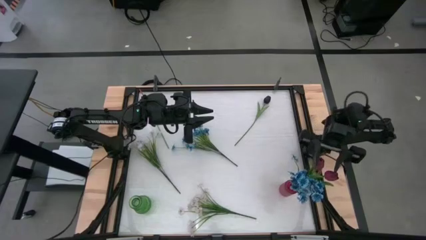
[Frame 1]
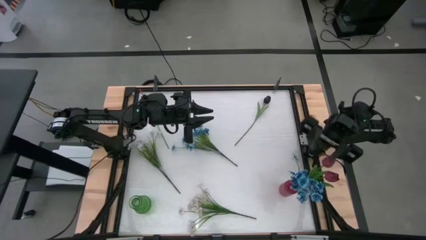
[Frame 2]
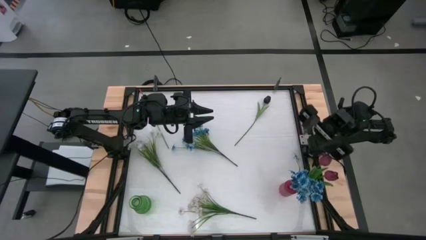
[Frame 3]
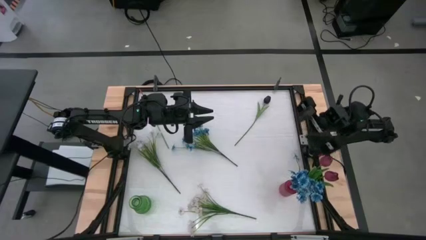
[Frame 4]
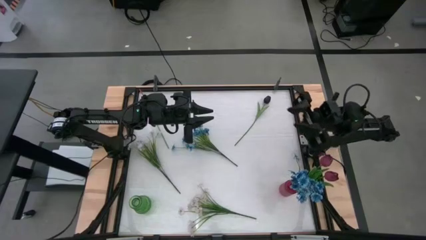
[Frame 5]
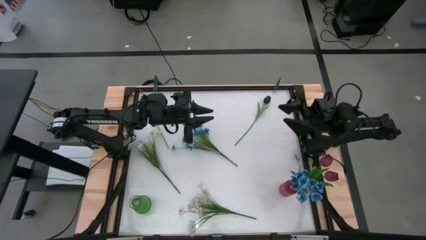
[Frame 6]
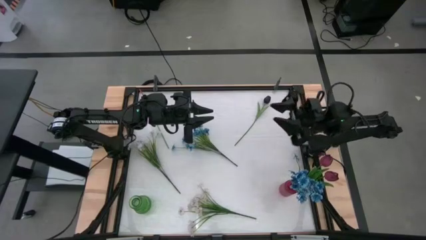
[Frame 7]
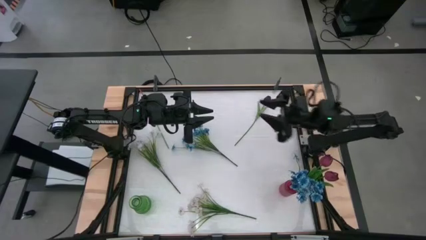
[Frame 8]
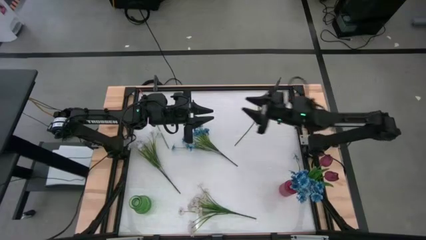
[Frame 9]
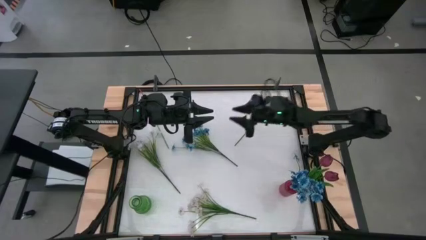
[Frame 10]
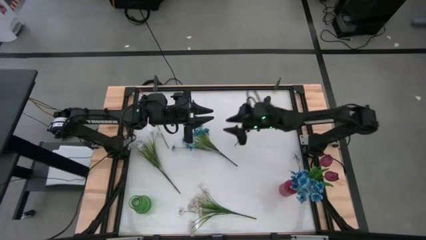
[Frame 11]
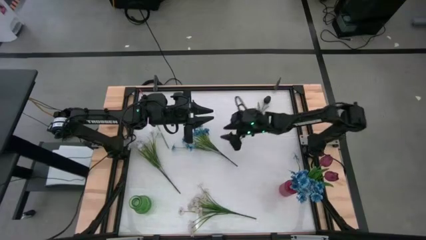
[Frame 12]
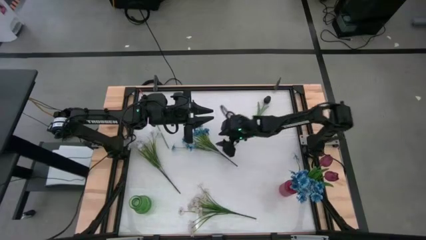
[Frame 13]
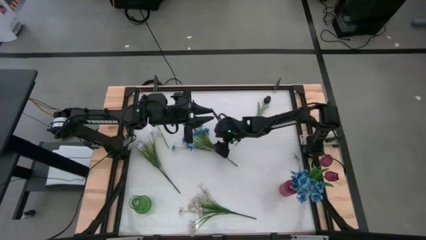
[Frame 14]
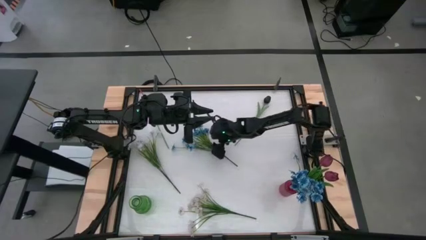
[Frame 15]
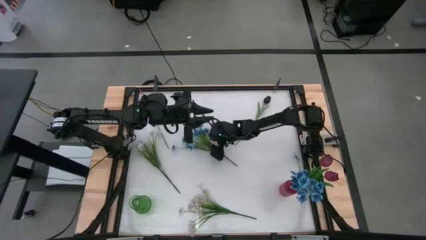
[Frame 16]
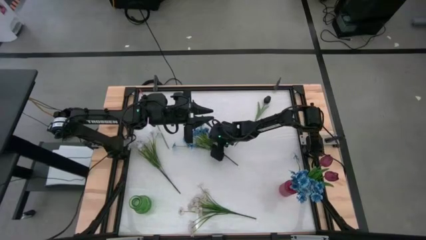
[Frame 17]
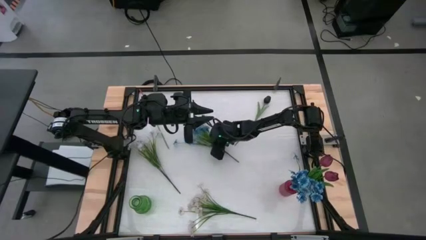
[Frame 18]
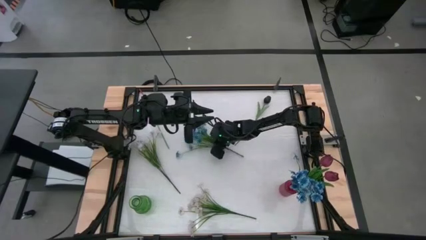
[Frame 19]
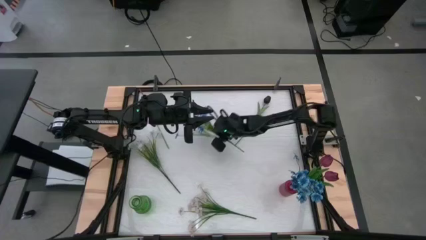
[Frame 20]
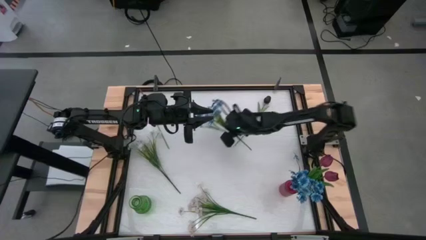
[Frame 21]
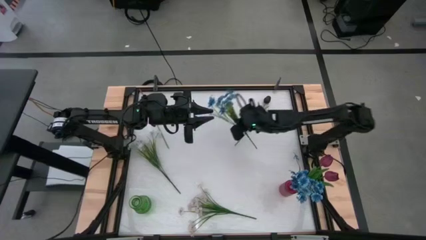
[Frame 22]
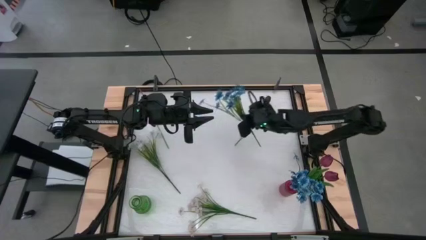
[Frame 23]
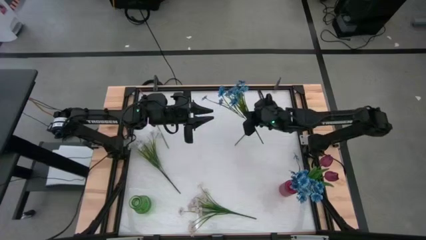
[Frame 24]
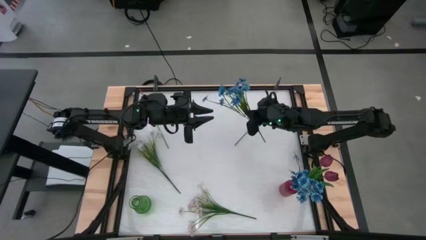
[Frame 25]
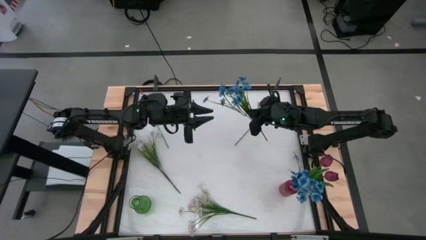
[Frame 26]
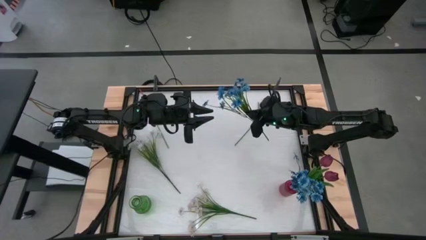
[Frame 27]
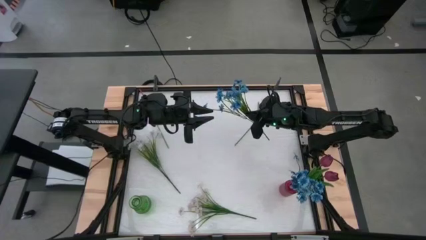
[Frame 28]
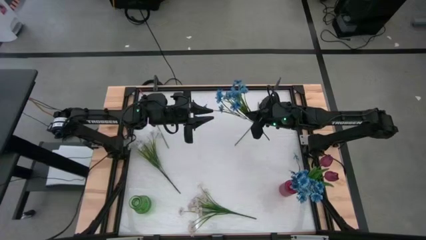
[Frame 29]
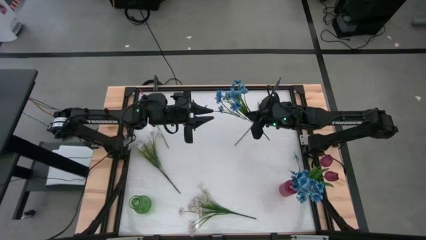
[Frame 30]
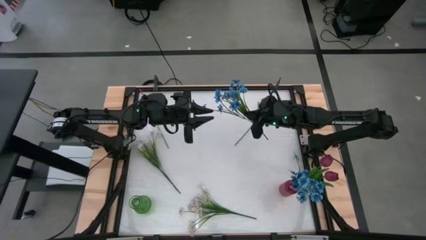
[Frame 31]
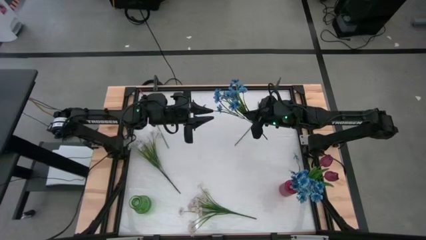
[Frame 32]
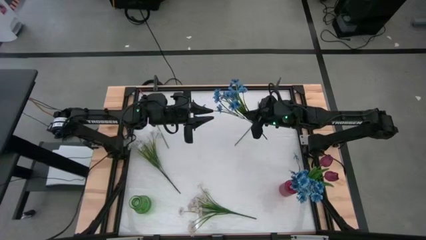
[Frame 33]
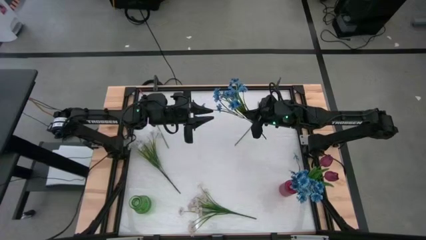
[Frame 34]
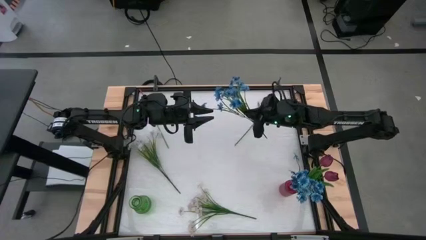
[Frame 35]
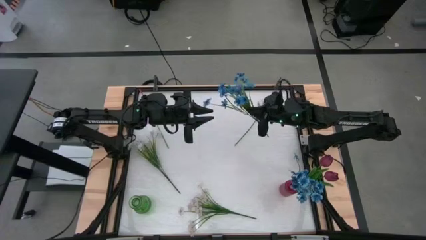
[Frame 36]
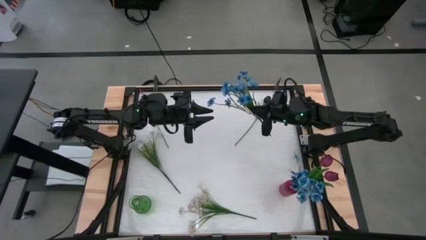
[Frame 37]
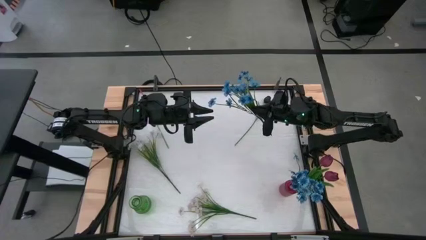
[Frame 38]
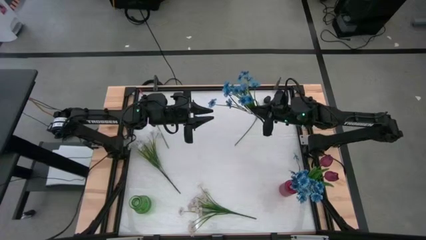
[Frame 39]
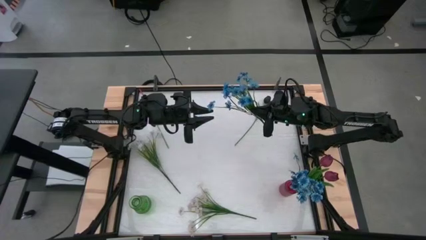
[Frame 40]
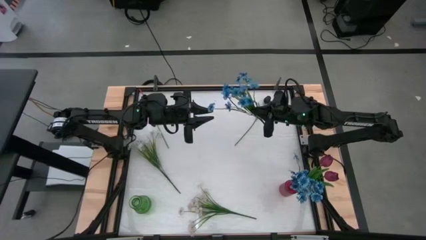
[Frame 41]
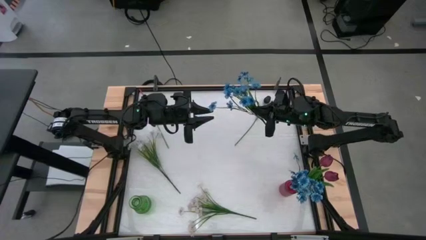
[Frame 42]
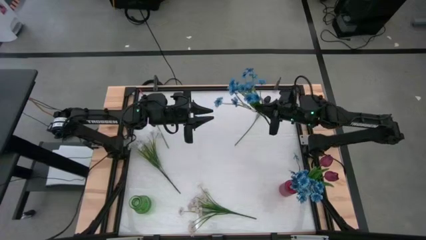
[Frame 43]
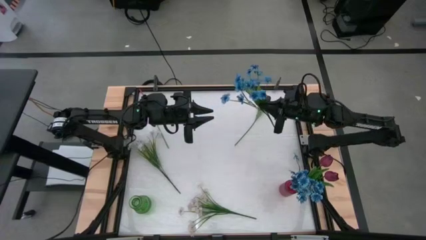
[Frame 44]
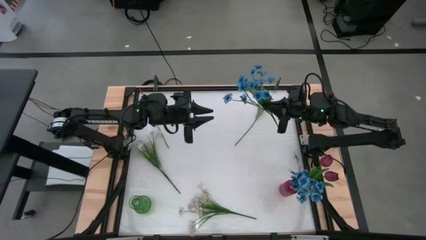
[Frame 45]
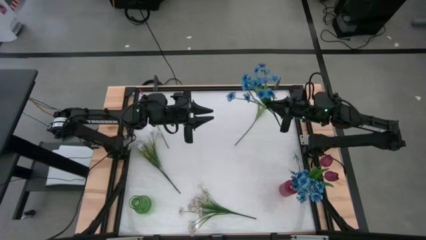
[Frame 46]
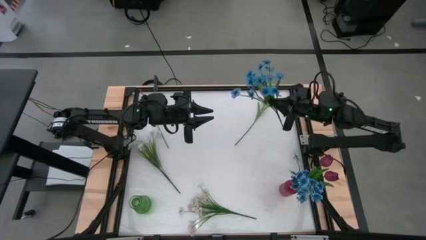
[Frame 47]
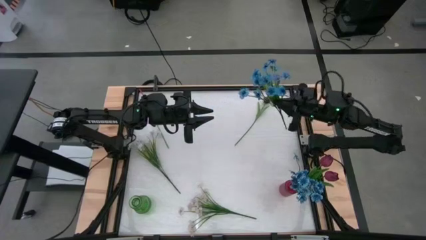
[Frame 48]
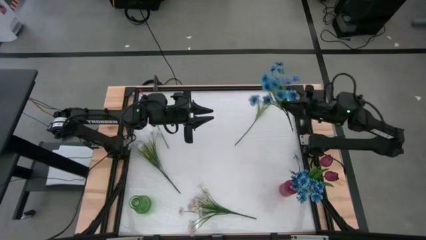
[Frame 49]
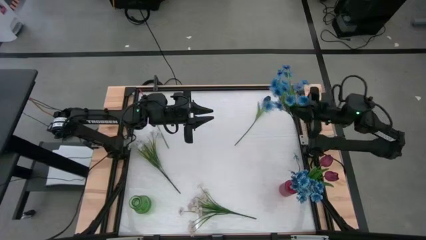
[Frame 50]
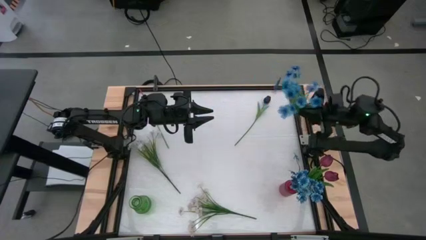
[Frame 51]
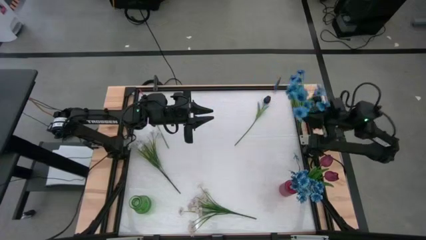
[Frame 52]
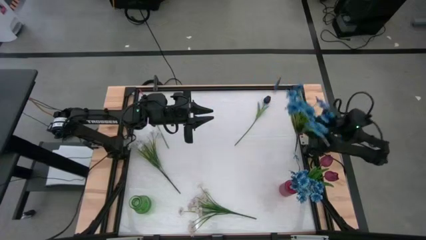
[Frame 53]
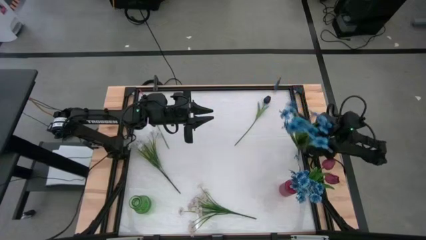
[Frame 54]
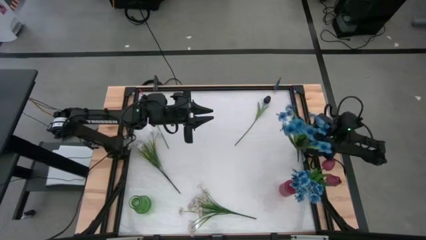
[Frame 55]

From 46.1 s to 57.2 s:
Task: Sort flowers into vase by color
Put the blue flowers into the red flower vase

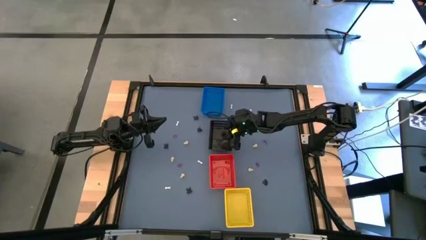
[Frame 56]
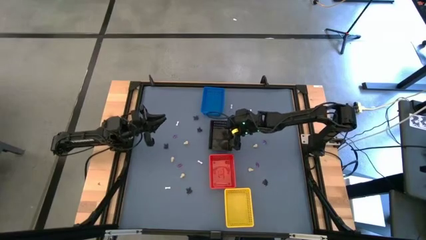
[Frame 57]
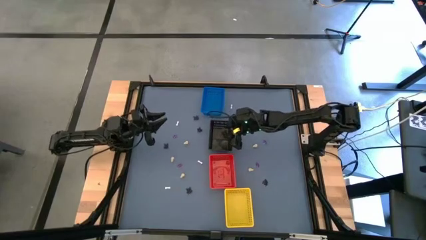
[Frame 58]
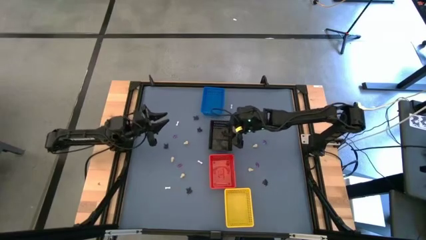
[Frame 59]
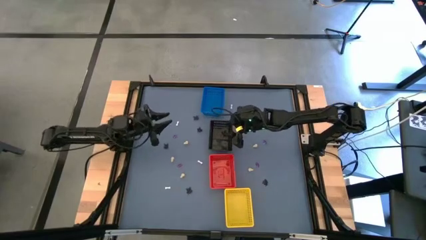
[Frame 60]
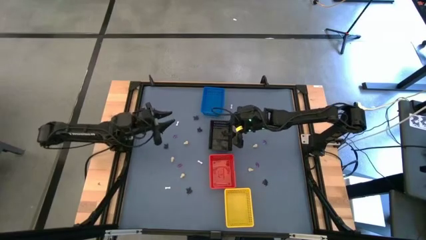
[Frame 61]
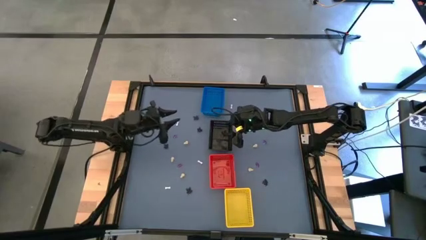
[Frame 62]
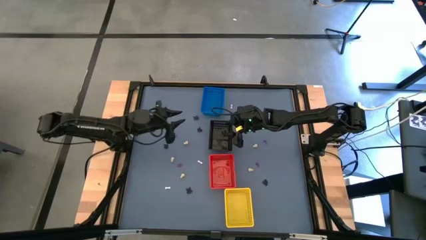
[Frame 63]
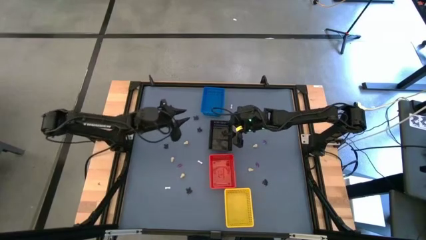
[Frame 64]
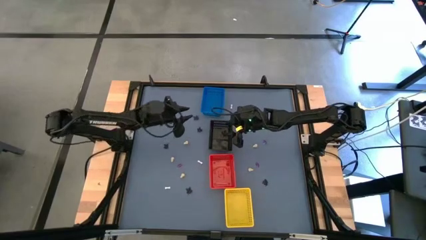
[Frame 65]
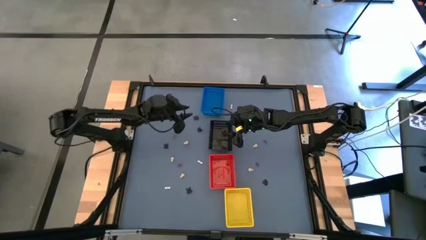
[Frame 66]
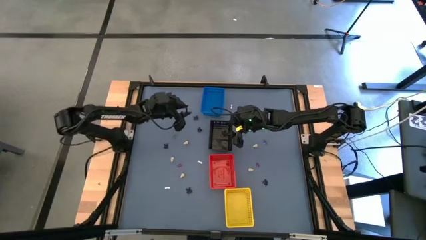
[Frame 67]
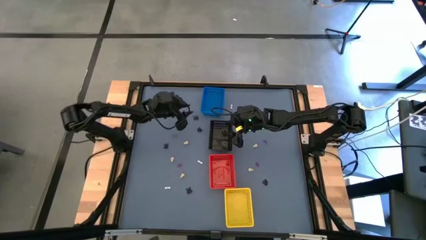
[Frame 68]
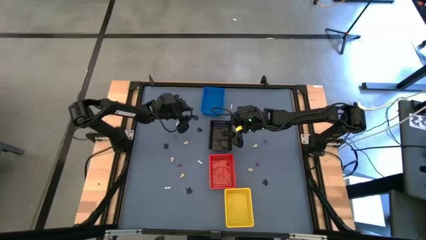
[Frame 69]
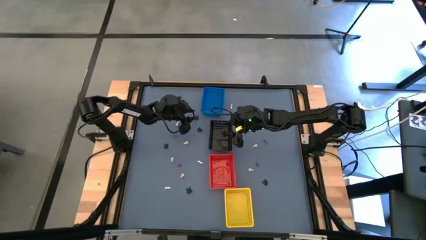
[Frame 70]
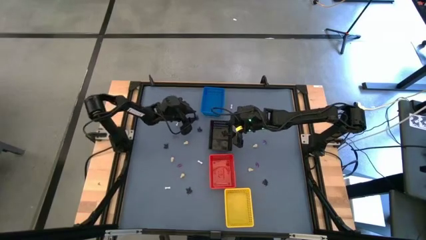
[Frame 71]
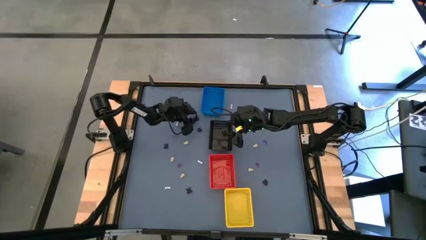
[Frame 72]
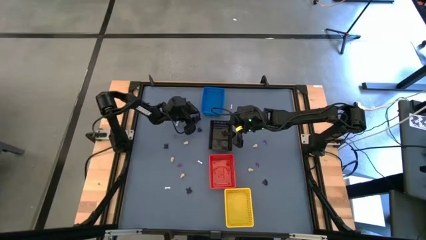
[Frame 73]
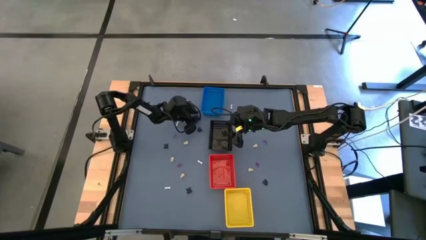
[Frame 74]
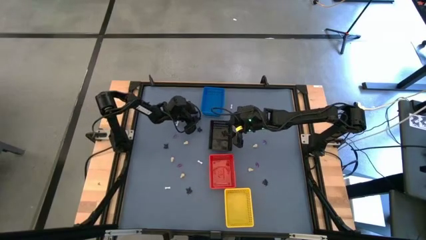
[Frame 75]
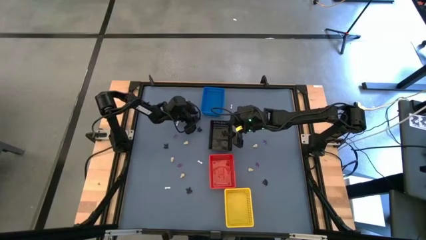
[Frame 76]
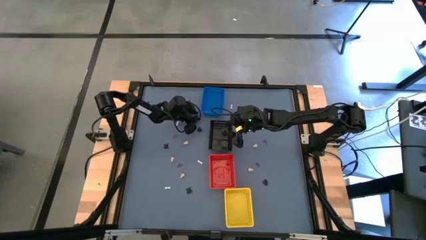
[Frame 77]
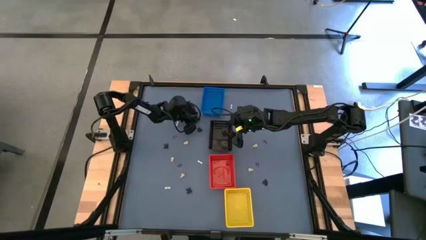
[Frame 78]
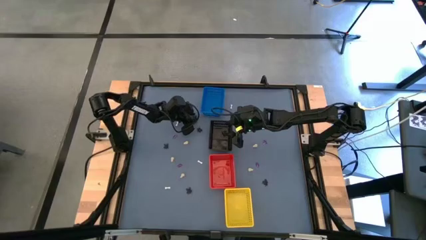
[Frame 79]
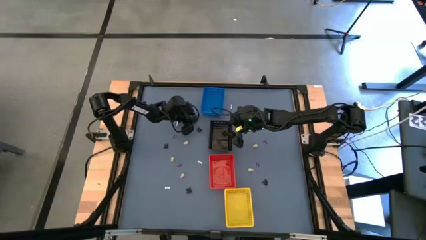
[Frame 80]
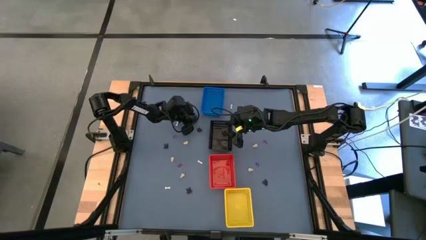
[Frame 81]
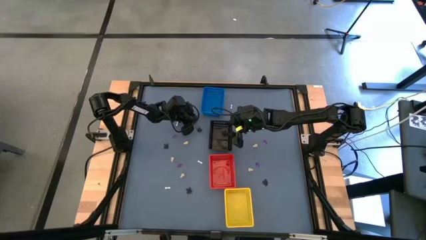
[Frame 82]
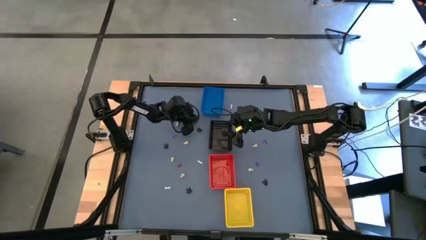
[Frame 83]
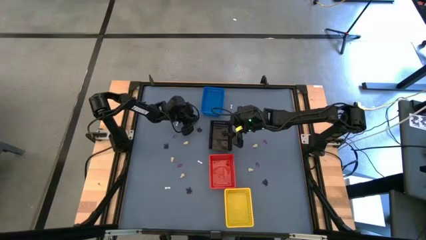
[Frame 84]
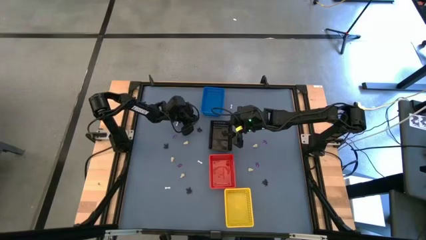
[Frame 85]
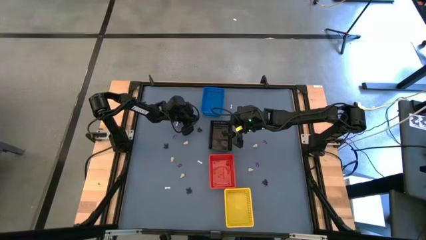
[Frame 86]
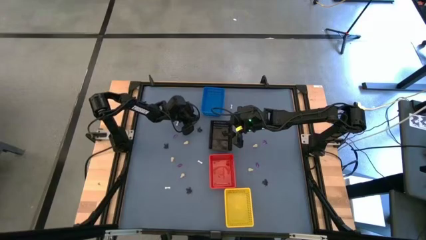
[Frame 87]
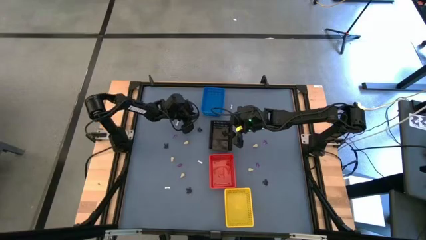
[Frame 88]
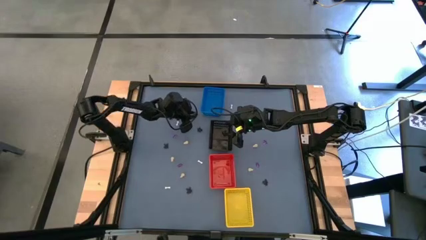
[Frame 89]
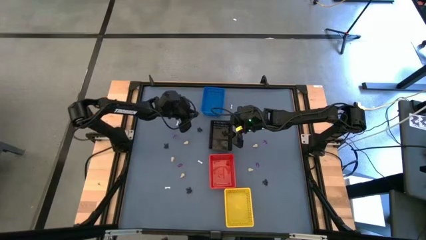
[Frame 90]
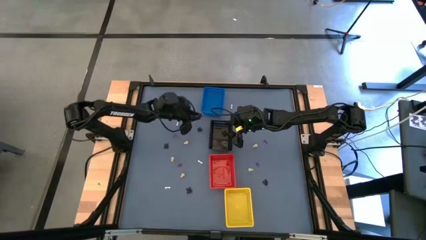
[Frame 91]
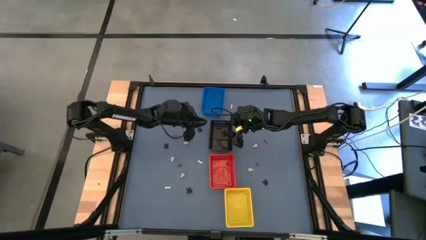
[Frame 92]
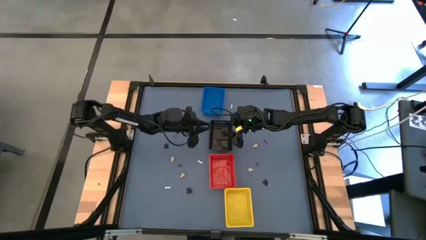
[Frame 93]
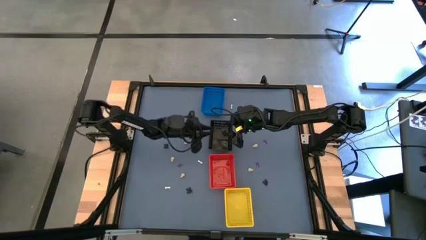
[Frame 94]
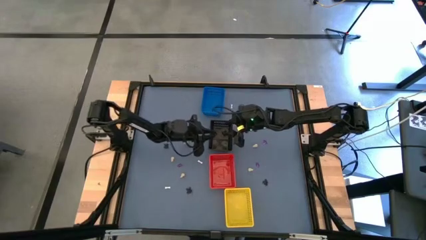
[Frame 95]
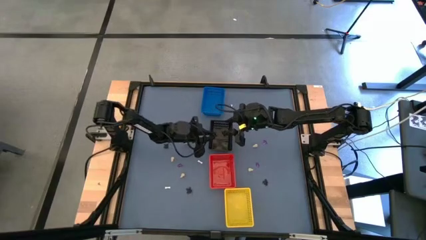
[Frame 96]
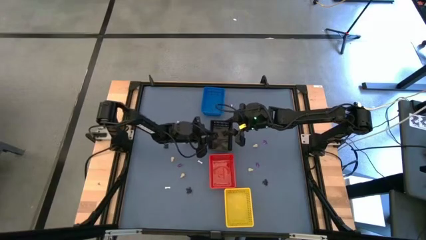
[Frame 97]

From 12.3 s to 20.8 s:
Task: Sort Halloween decoration
Put the black spider toy into the black bin
